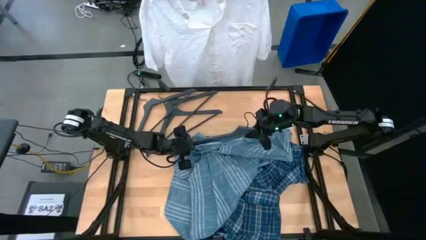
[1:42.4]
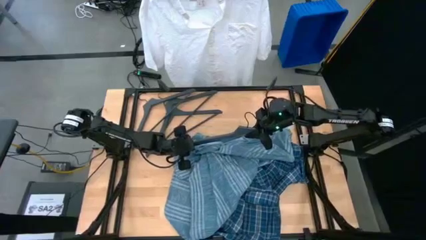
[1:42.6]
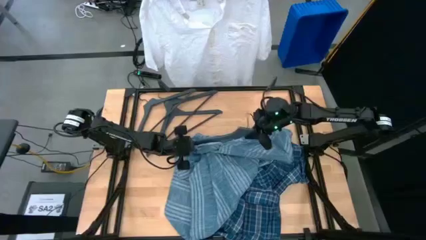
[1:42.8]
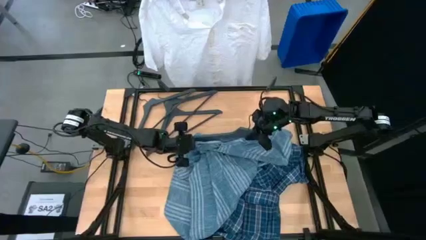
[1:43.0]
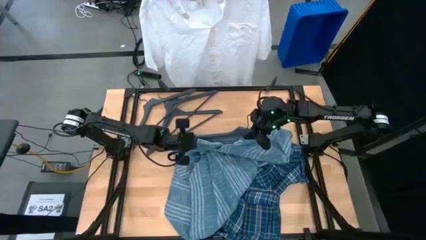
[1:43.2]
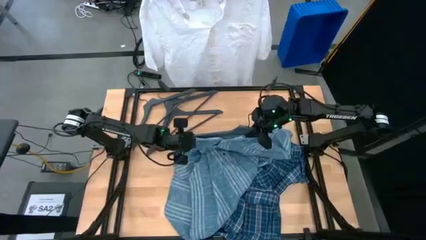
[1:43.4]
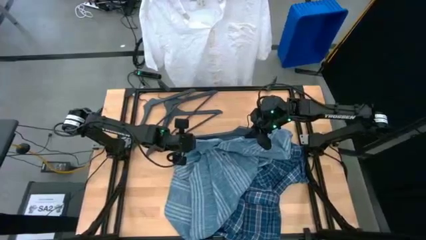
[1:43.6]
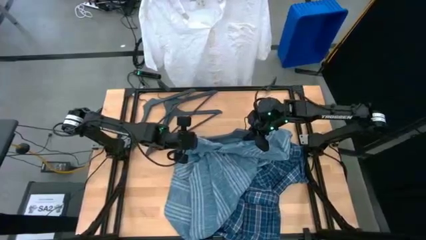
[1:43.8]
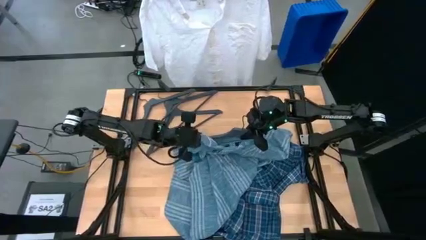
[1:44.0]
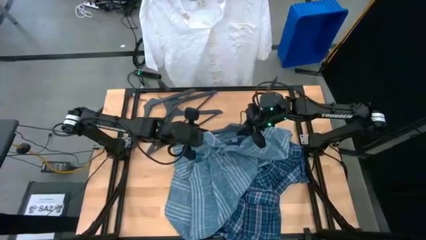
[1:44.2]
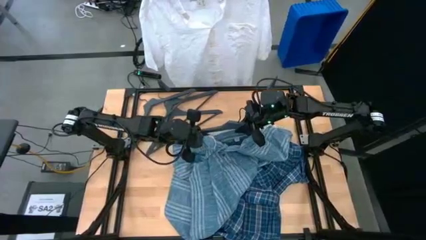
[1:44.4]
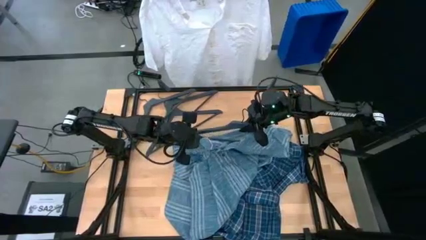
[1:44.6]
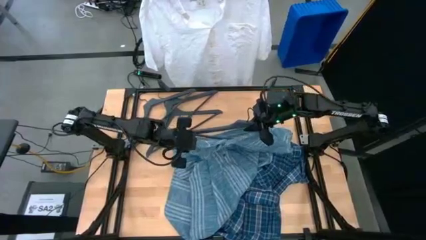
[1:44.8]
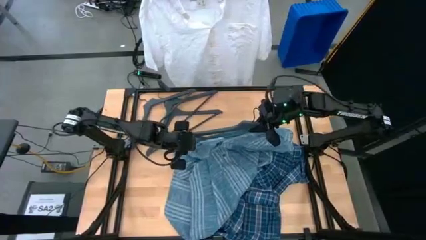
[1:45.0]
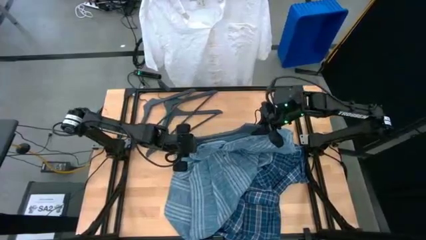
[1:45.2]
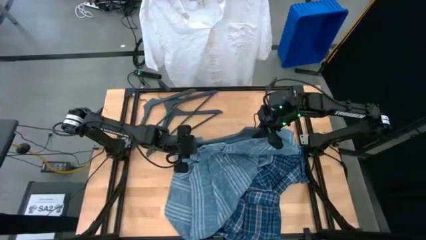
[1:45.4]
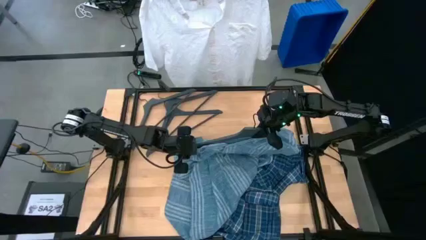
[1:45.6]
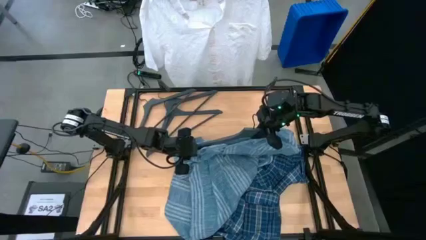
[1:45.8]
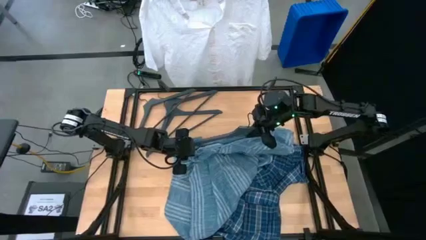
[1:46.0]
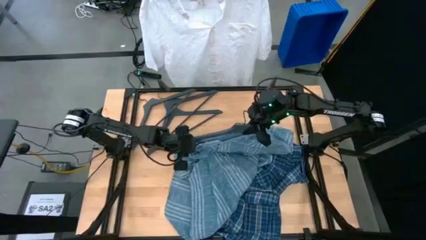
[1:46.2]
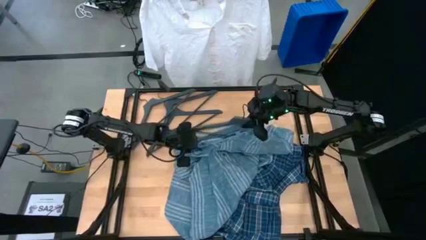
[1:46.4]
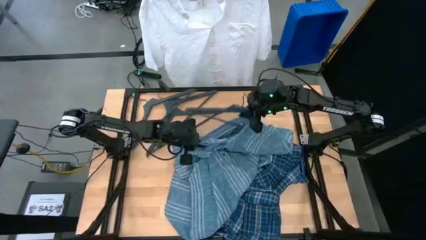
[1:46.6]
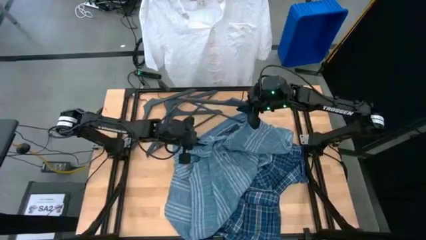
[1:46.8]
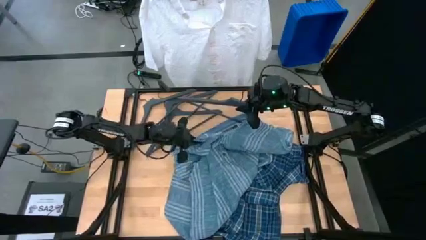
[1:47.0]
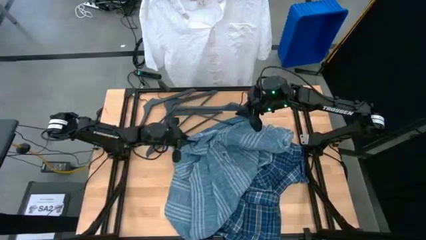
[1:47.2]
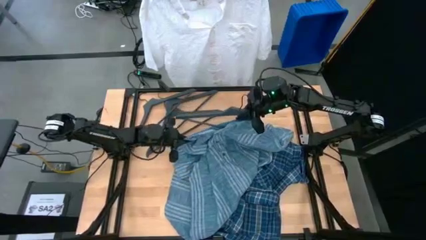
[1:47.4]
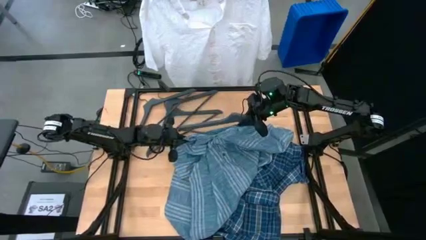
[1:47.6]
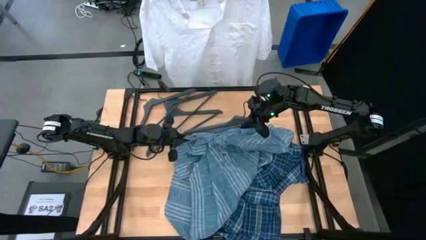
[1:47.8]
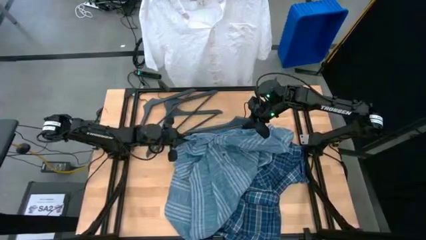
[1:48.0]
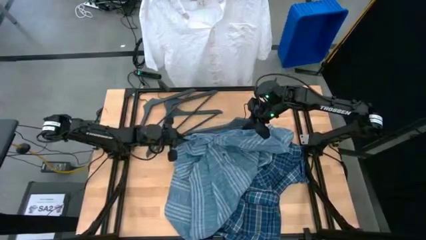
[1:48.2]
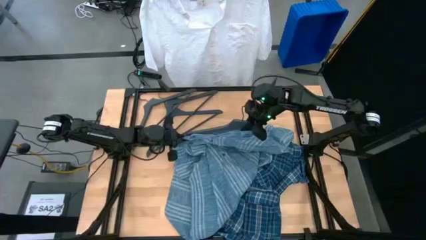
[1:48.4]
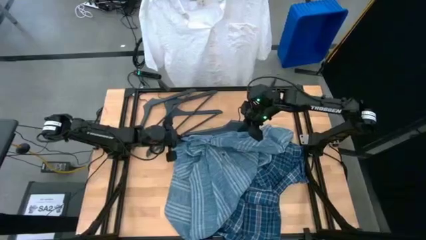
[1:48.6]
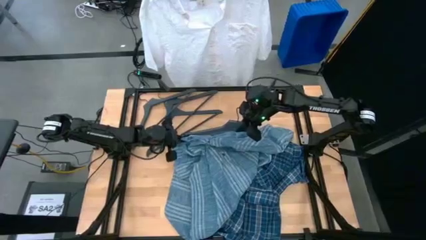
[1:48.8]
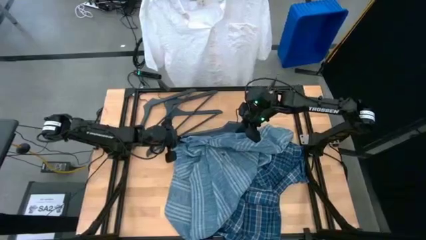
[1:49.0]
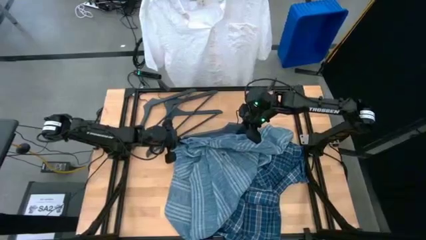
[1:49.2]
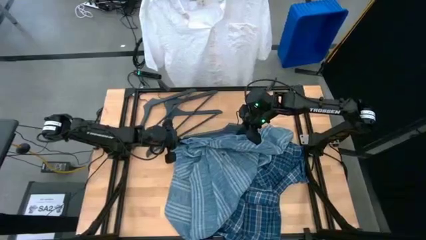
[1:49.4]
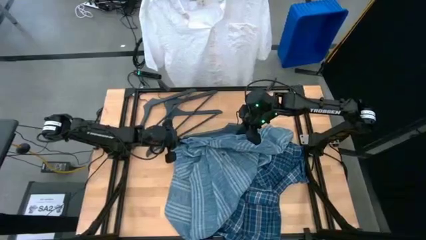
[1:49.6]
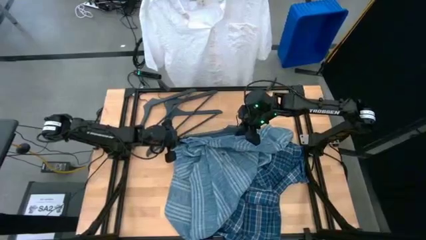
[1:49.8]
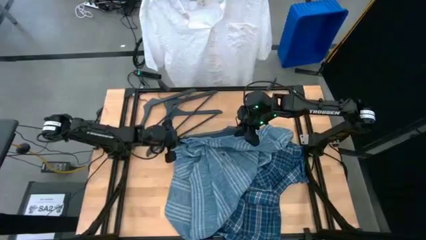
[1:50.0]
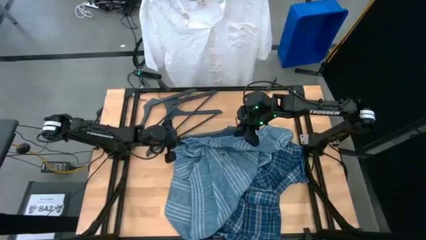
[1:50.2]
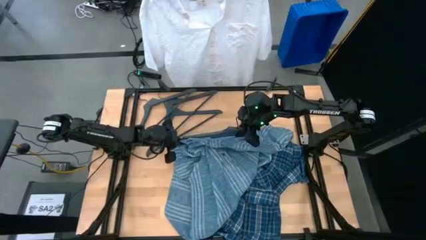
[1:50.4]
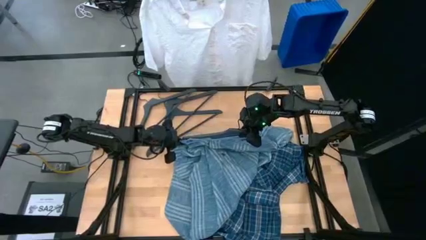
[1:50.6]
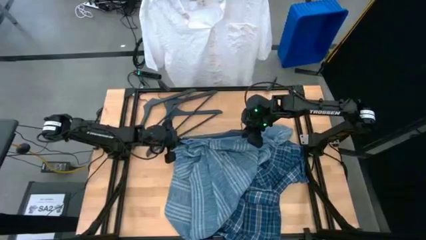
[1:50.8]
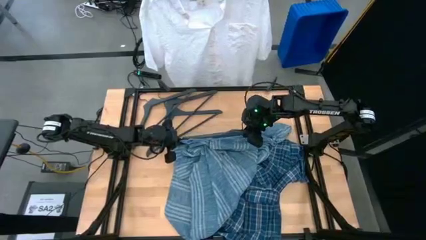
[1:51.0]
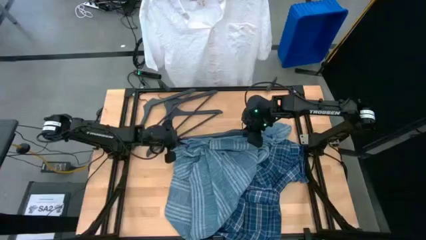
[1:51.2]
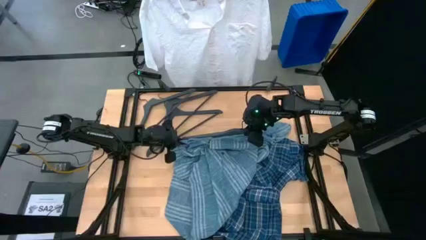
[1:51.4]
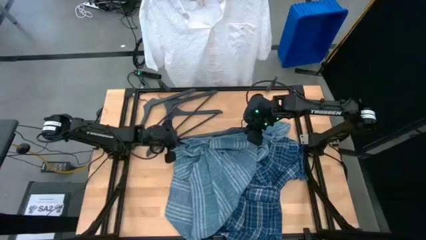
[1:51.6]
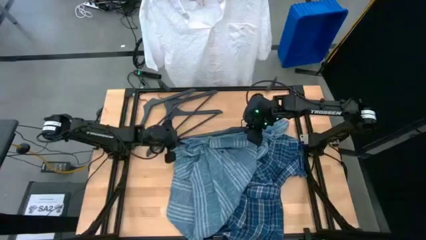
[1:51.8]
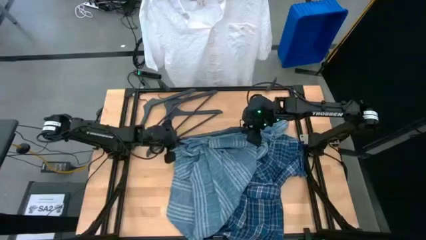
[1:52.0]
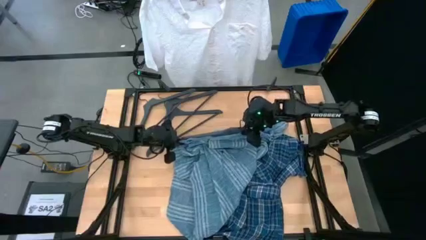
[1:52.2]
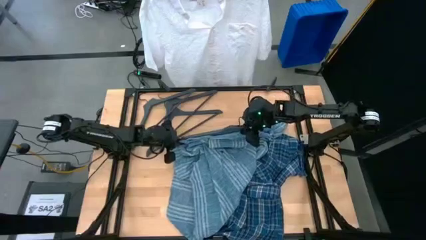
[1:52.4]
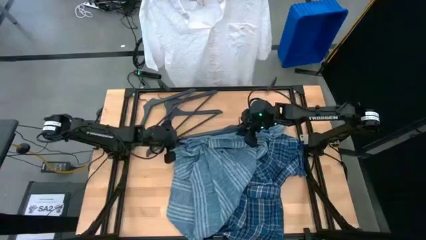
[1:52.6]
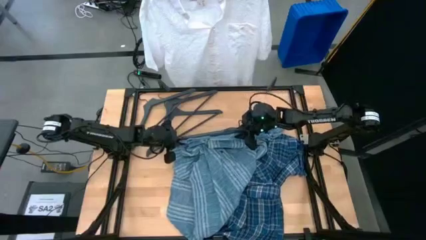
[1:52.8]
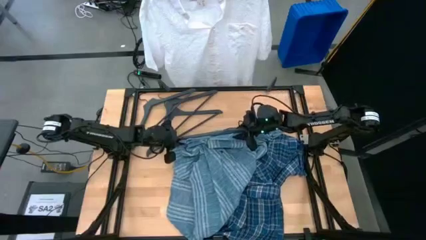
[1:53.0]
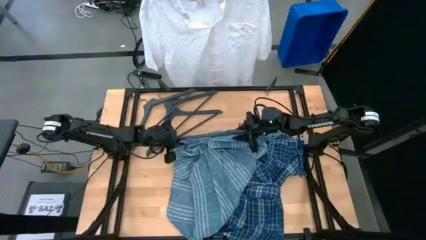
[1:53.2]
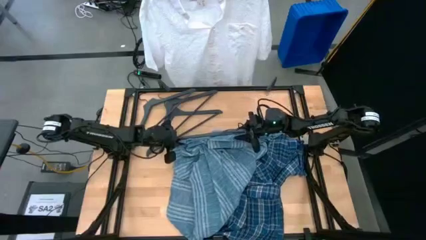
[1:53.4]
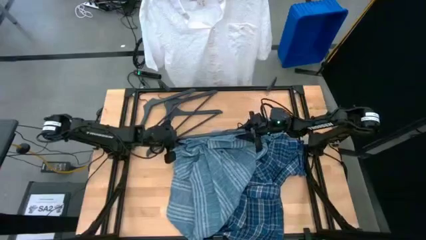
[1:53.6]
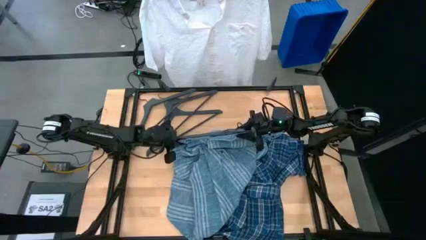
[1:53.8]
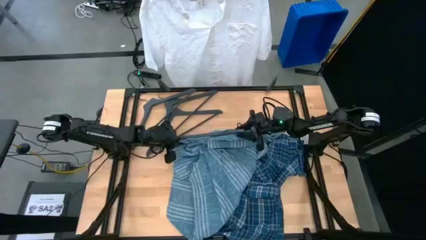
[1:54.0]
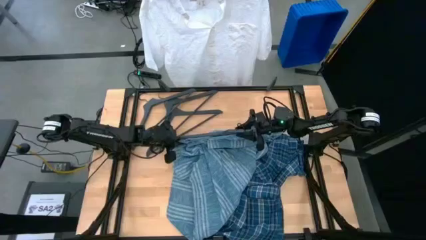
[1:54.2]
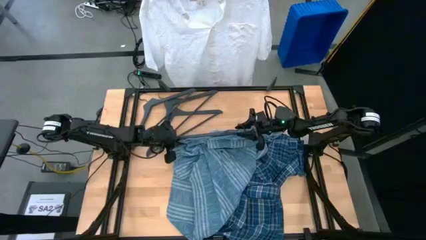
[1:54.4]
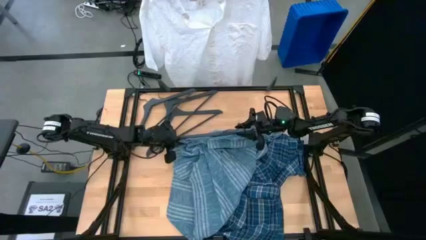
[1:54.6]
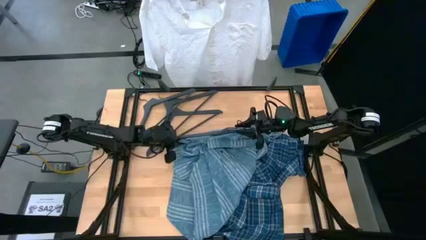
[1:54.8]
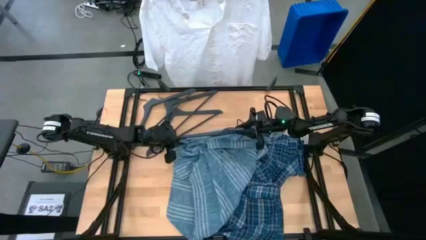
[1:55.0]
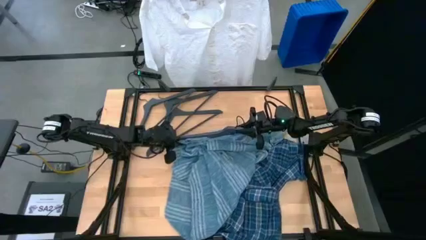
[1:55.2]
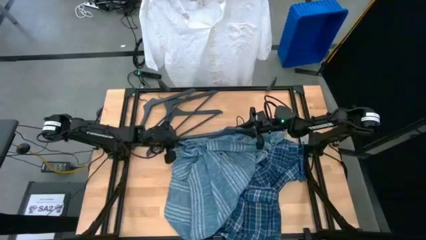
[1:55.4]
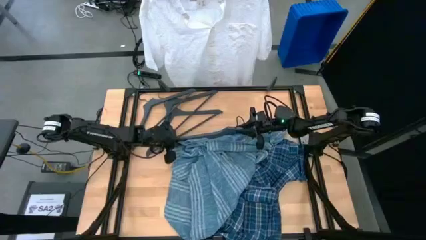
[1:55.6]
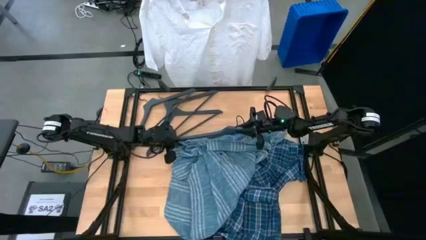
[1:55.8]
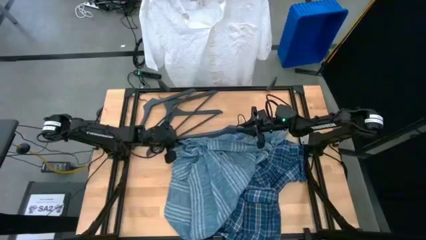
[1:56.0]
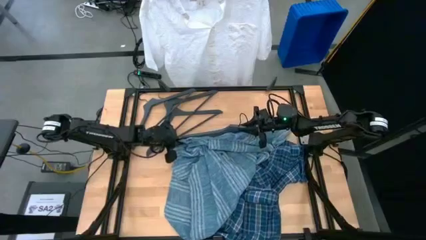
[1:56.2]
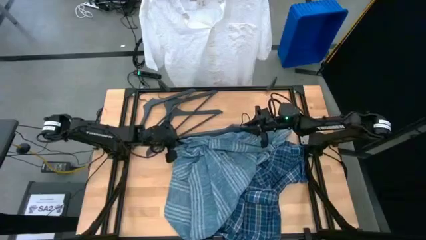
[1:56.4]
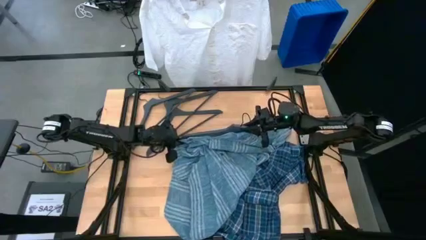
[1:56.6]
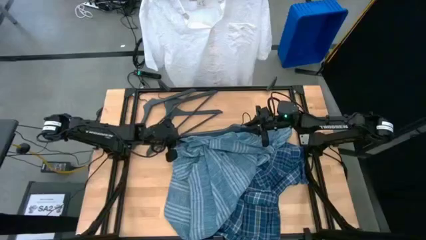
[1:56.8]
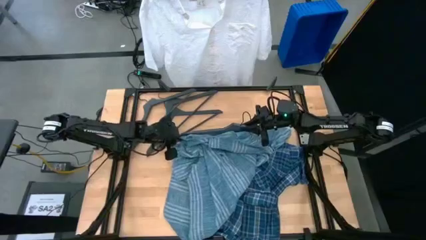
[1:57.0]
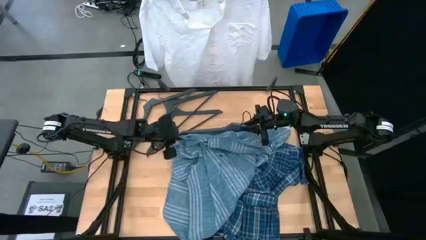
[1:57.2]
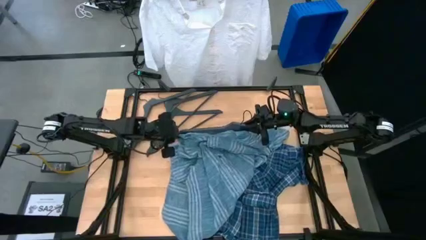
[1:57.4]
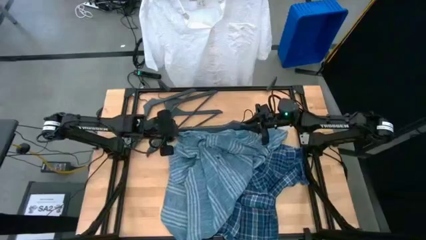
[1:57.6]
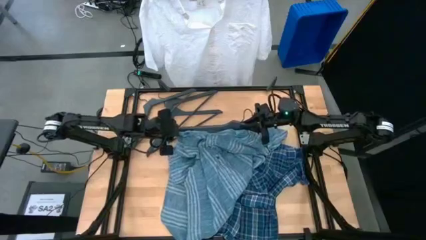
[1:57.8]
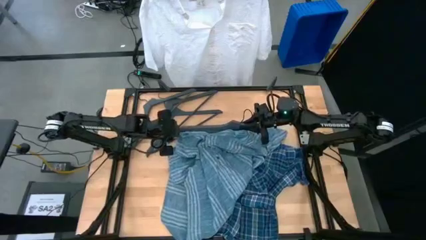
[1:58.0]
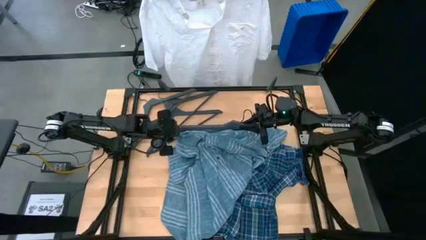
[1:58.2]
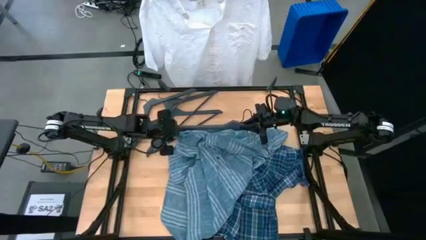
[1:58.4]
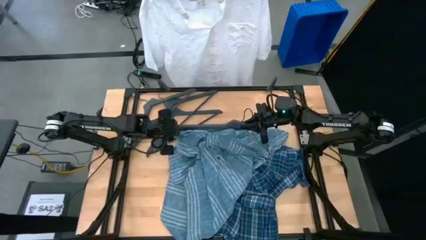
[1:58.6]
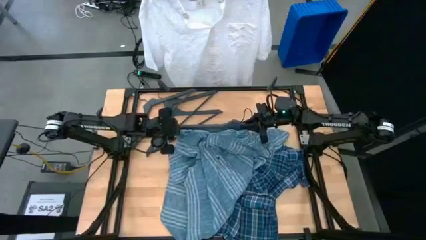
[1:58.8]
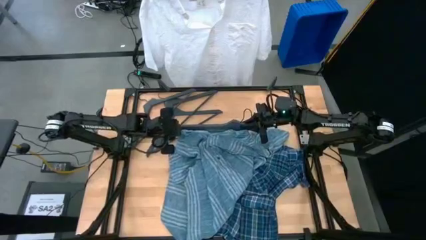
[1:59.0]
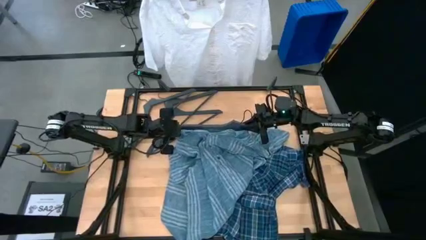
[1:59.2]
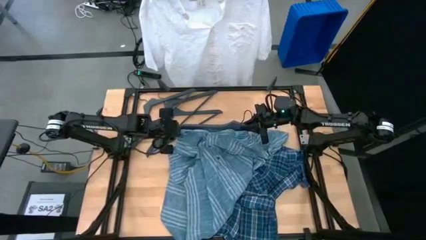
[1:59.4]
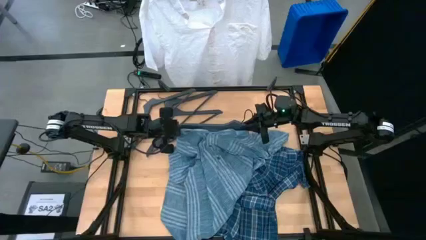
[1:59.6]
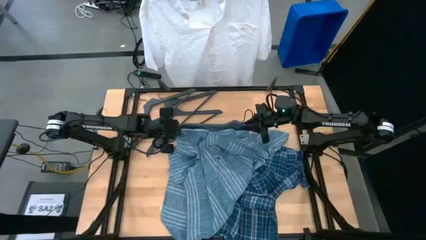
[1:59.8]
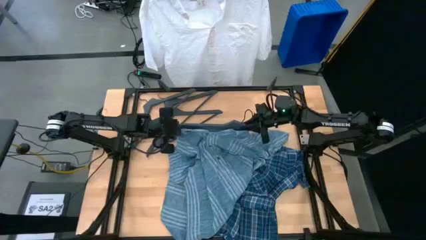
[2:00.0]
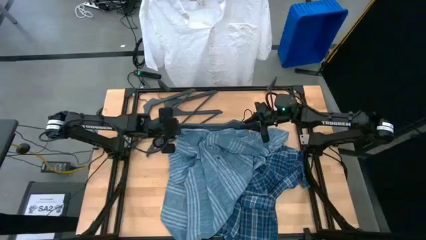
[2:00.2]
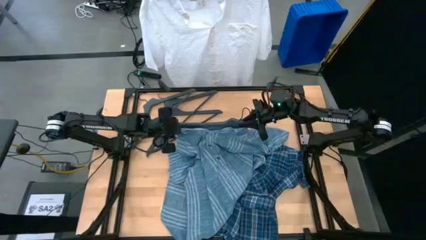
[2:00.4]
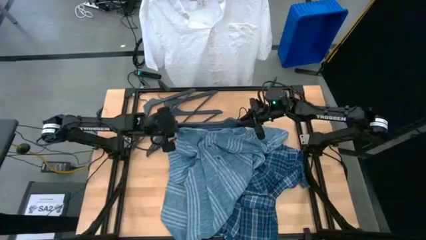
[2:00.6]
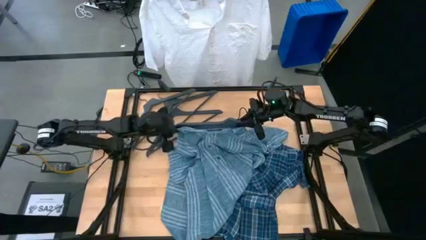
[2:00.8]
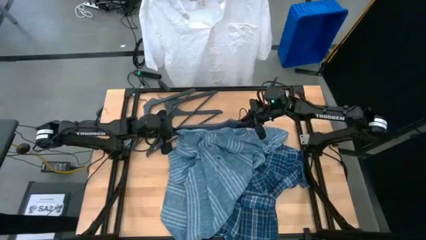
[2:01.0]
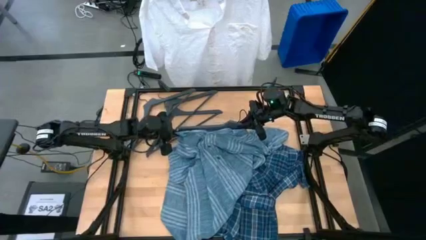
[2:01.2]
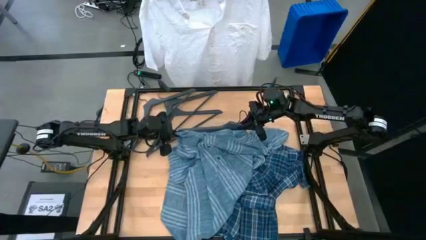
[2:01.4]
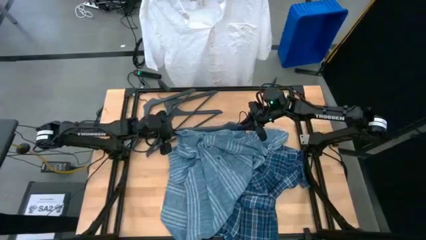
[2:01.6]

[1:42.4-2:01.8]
Task: Hang clothes
Insert the black hanger into the green shirt
